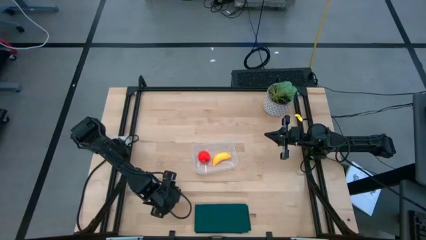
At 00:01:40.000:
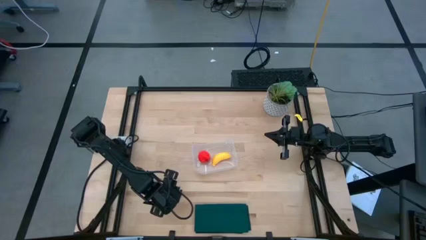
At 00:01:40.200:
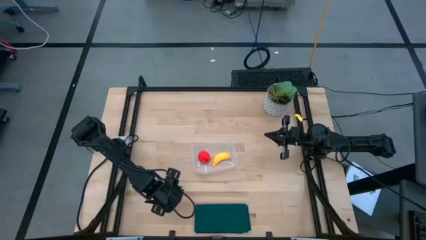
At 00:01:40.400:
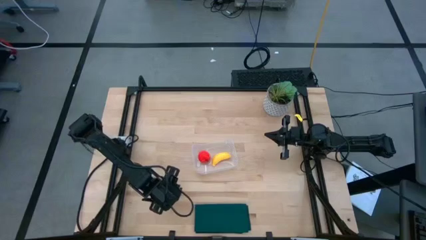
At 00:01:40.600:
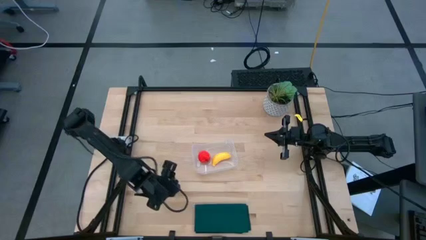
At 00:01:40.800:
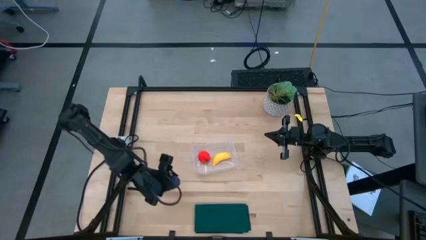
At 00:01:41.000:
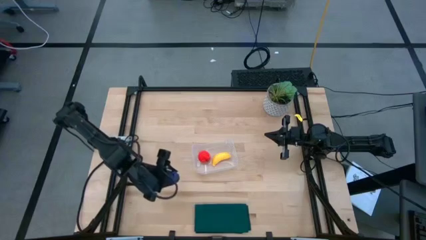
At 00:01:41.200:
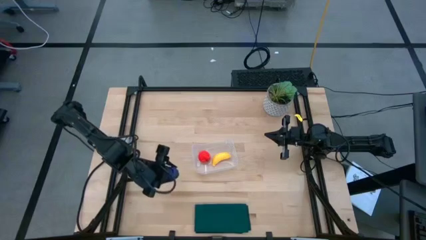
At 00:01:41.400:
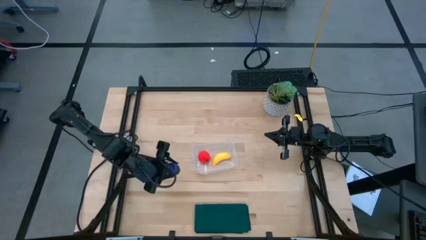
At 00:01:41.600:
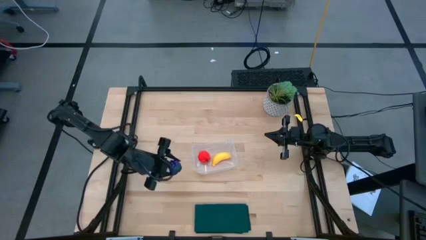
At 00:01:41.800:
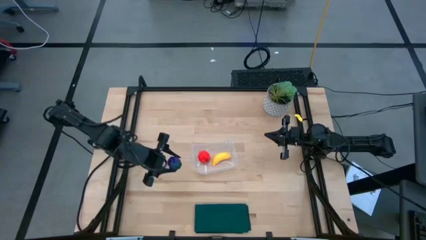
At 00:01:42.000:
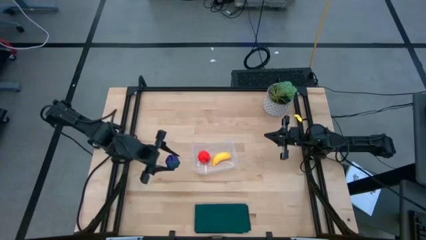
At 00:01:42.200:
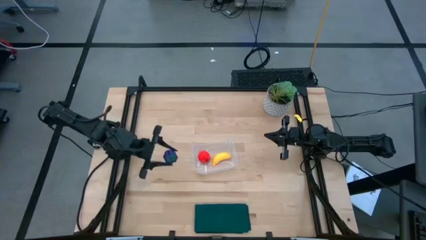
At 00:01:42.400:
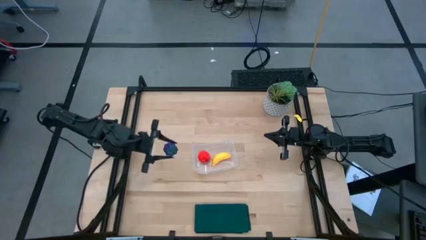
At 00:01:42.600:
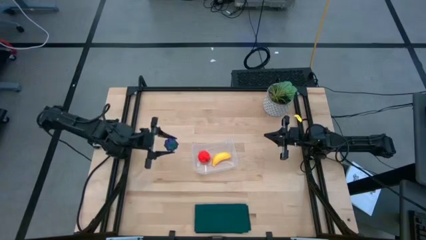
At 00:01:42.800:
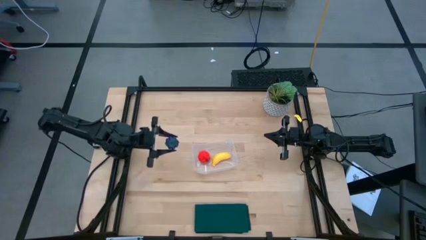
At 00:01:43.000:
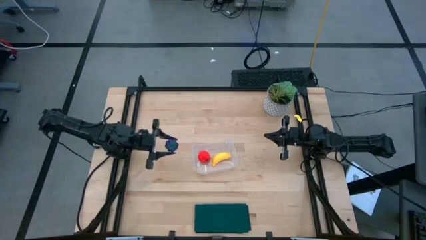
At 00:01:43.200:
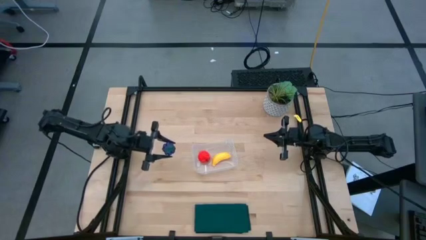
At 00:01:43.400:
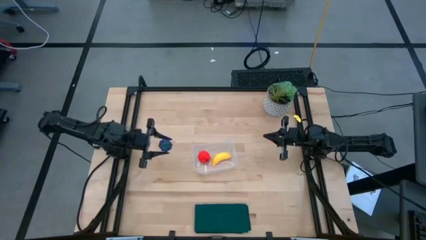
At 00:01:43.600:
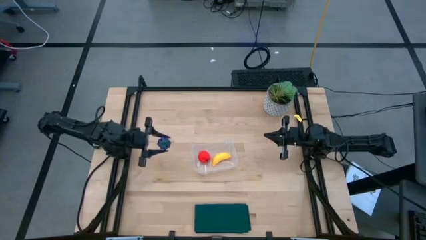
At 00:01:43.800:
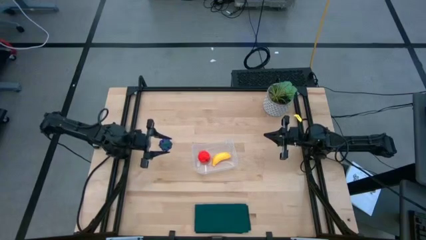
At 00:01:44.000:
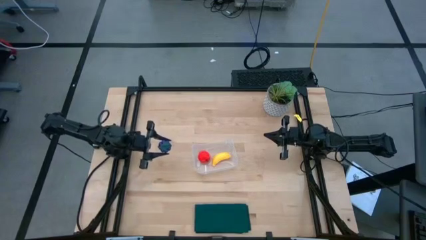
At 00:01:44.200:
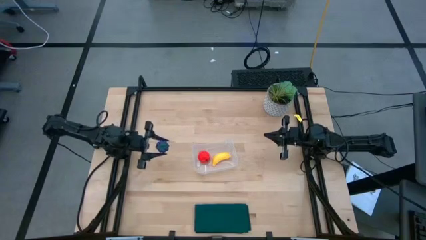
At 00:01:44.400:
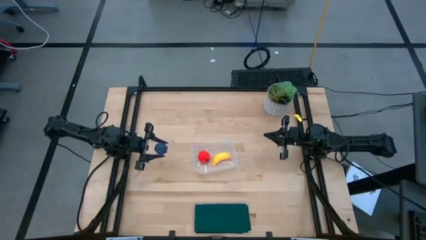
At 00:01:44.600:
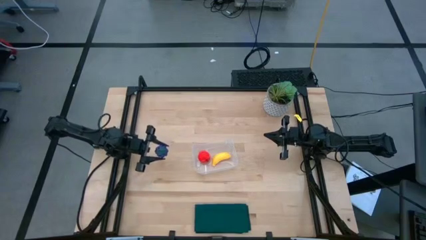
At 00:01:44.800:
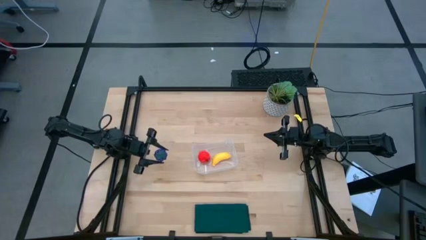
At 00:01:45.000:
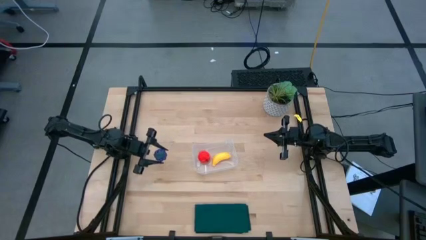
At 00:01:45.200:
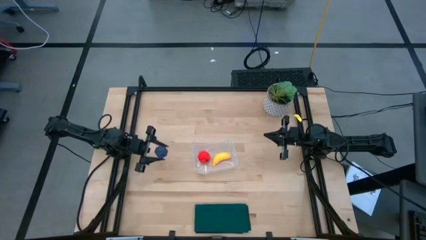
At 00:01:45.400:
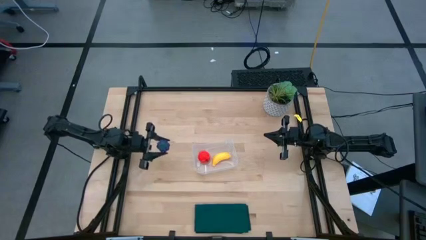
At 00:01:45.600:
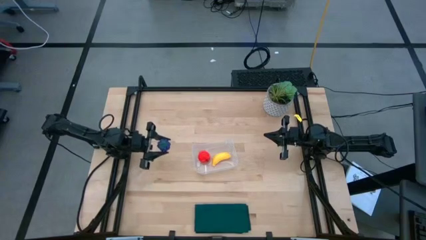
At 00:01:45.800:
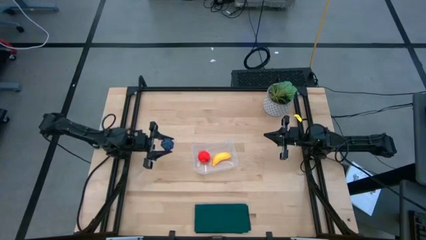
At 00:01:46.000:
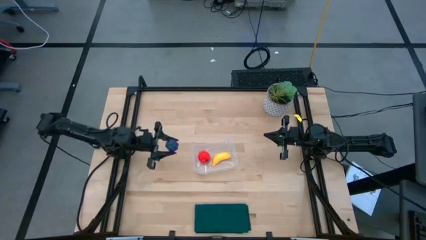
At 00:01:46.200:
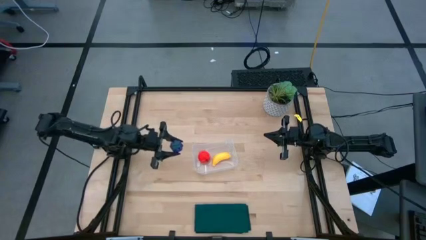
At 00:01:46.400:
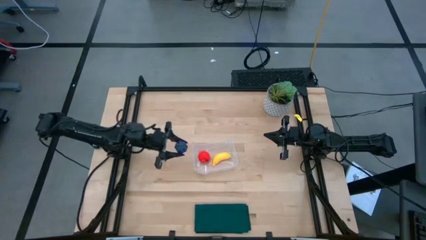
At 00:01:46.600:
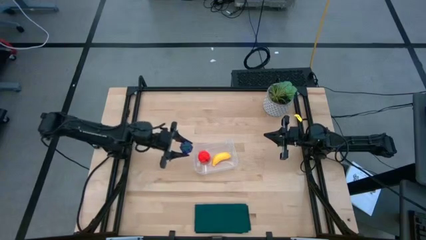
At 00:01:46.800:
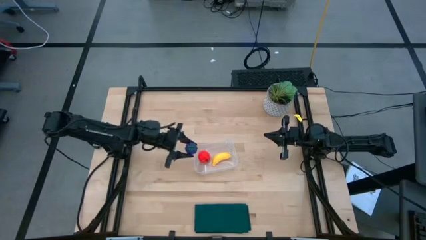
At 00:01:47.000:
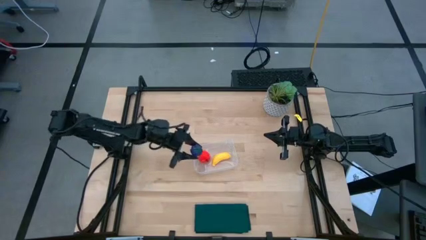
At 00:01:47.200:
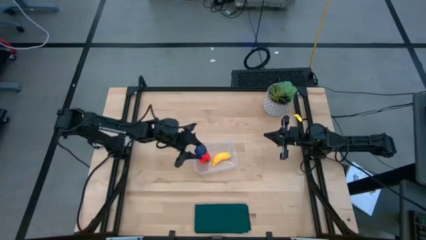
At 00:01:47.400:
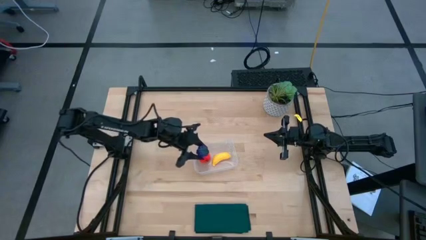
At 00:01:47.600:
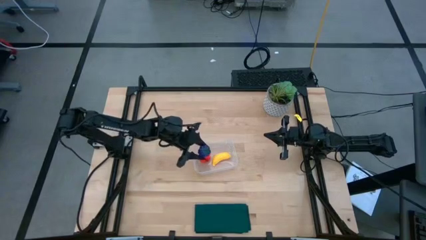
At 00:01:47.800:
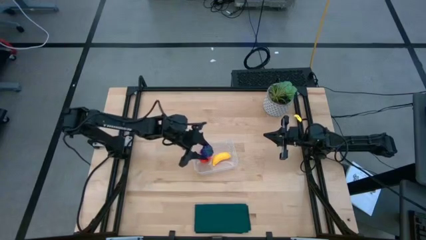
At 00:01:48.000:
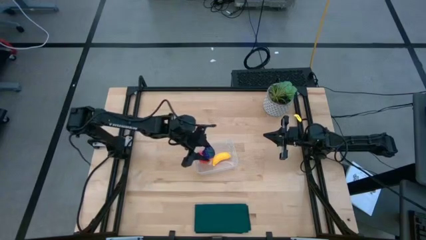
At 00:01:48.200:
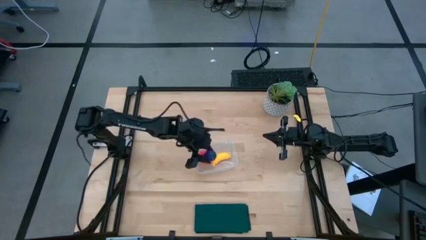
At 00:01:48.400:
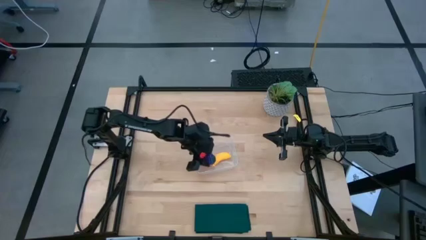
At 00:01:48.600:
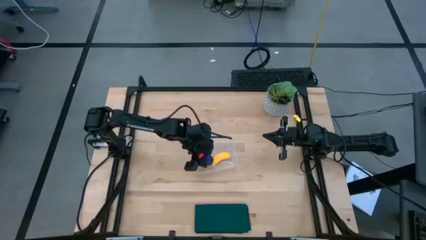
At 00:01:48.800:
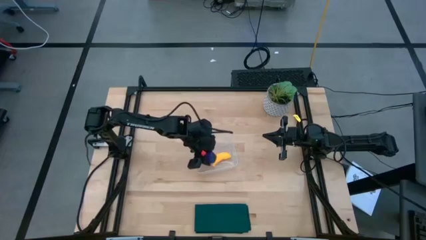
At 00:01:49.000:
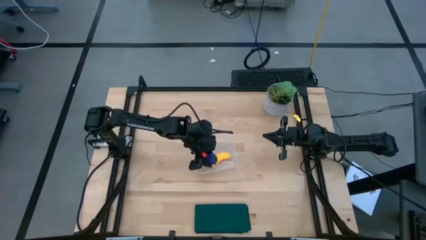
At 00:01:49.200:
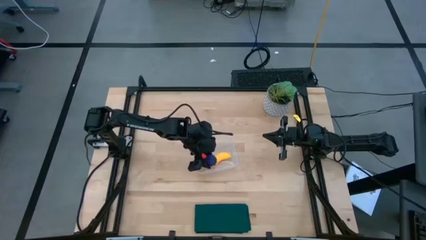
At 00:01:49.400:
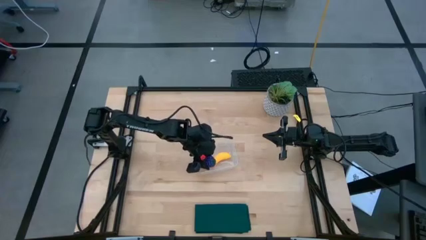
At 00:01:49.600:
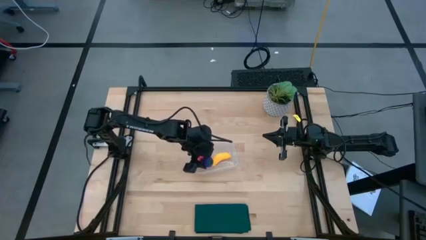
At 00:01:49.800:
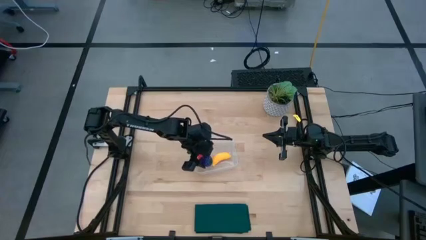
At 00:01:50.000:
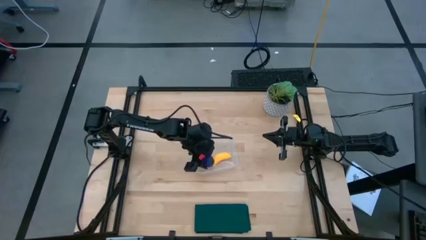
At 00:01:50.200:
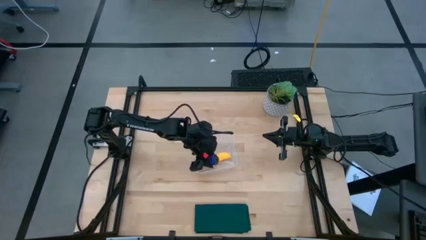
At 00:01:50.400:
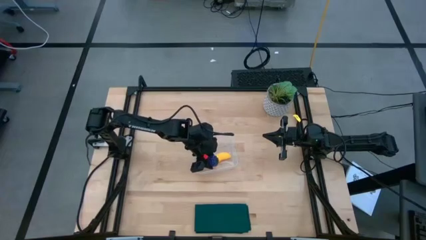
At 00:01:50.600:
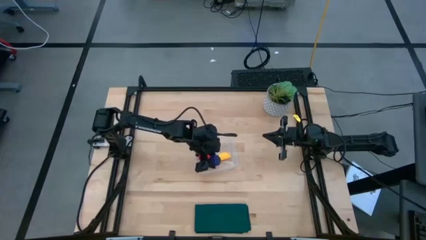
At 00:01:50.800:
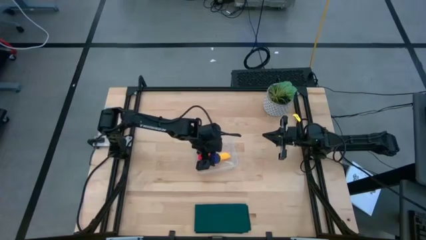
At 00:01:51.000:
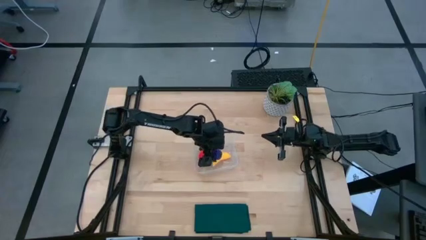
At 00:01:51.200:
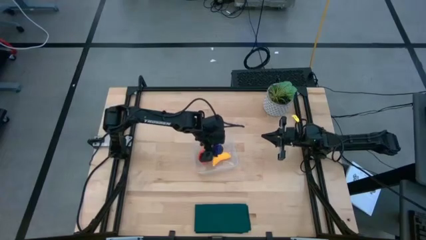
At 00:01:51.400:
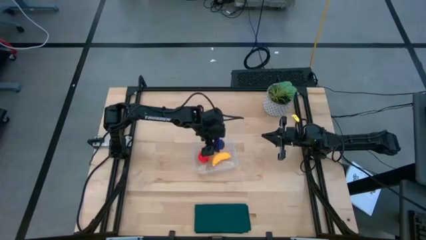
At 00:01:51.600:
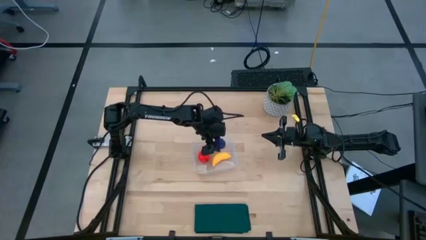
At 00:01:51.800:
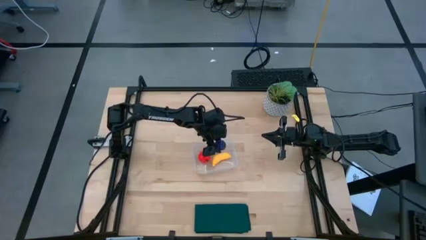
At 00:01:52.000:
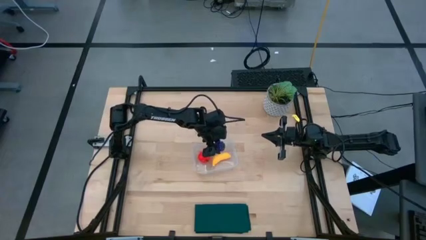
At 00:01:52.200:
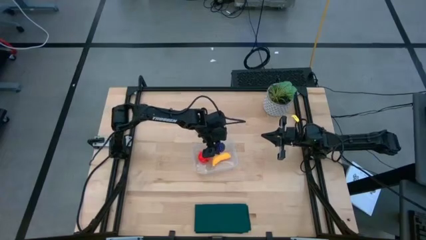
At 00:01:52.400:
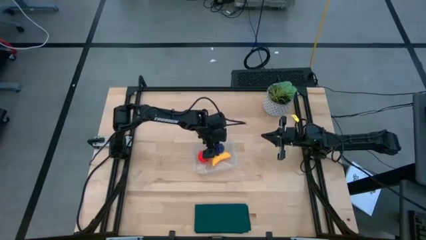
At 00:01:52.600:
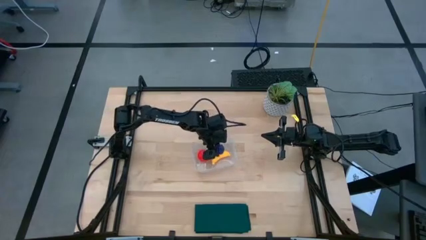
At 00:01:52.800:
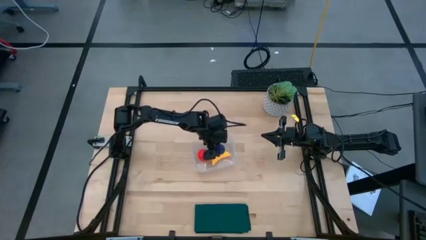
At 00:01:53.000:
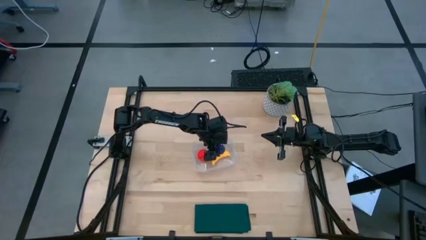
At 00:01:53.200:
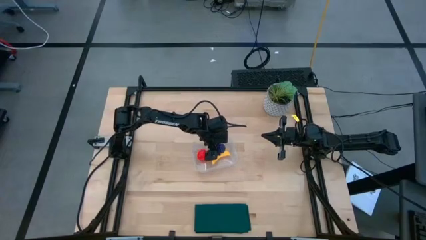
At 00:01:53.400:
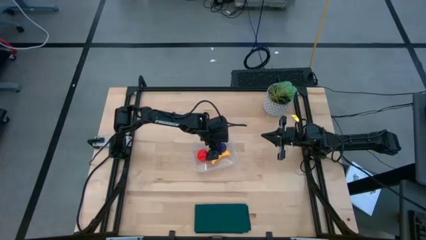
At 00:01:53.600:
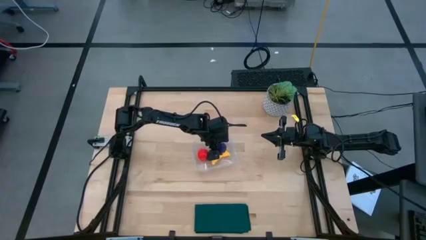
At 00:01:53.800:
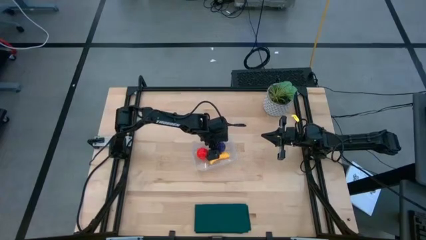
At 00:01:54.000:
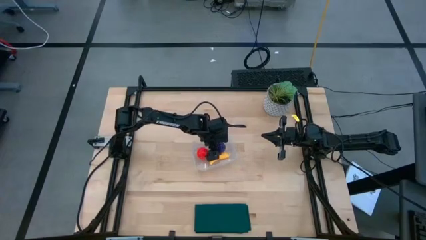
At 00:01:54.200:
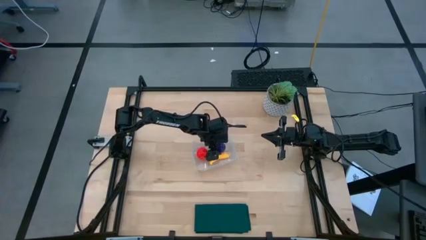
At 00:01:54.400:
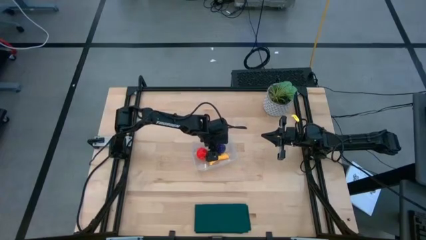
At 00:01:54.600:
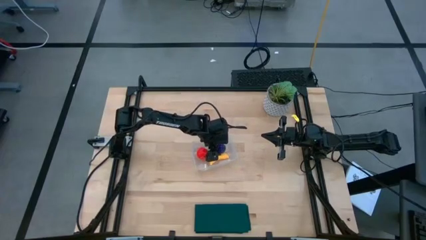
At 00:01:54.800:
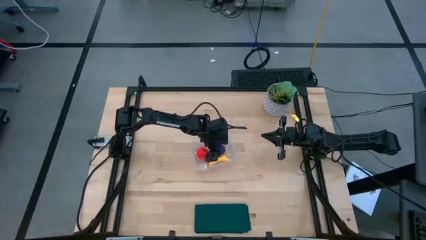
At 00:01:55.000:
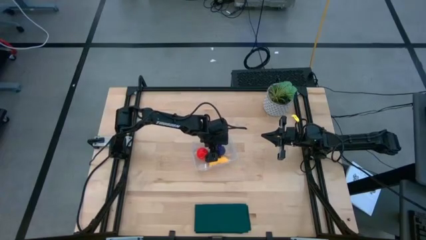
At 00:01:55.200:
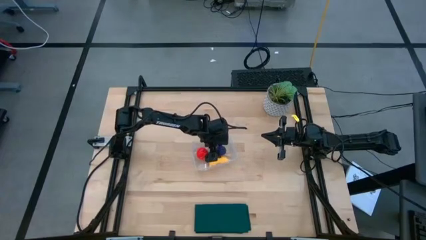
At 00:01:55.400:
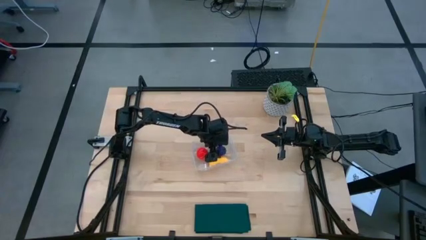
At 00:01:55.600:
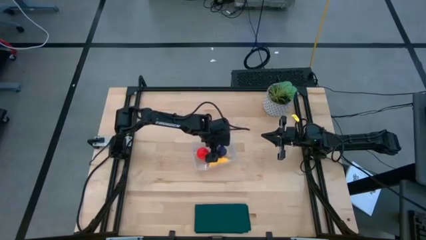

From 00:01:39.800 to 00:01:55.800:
Task: Pick and placing Produce into tupperware
Put the purple grapes into the transparent bin

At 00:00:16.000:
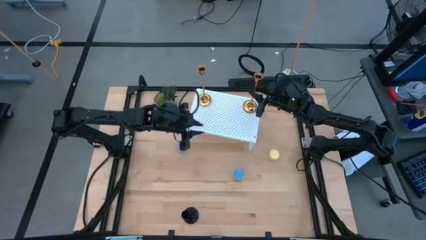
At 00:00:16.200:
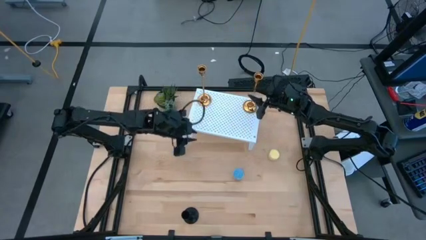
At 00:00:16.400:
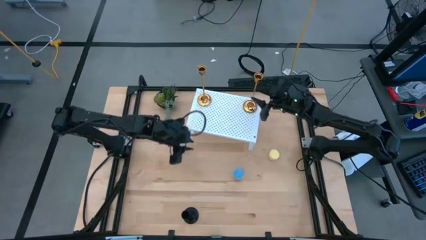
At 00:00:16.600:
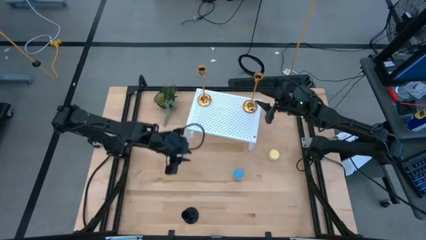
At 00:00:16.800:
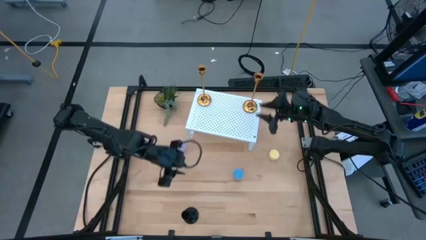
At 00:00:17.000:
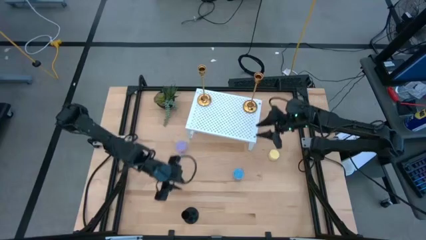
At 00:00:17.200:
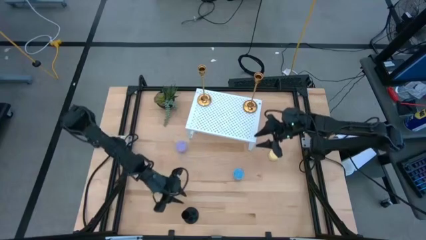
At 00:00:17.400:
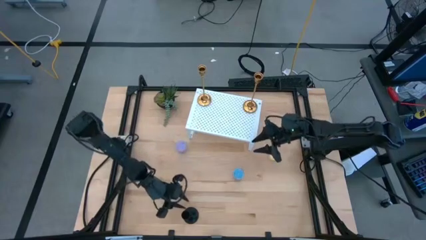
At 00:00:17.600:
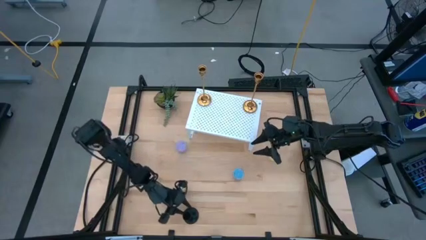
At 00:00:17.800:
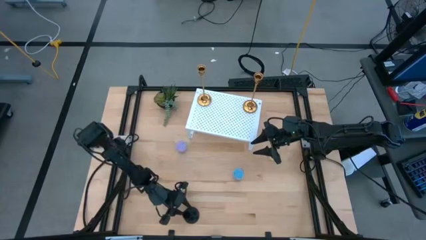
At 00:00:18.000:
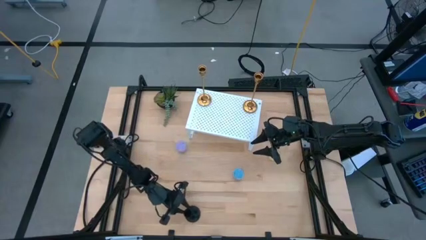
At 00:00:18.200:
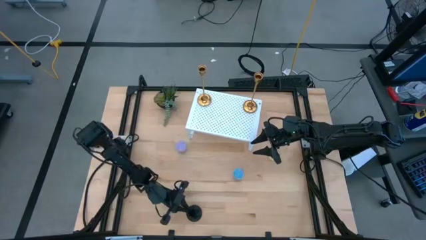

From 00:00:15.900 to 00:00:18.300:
Task: Pick & Place candle stick holders
Put the black candle holder on the shelf aligned with the gold candle holder
